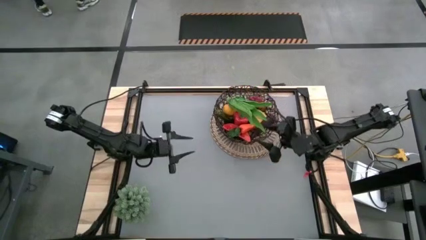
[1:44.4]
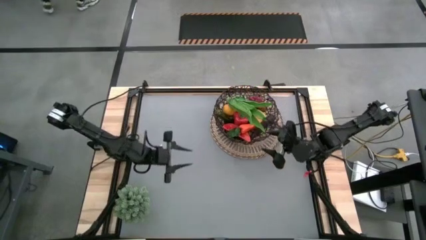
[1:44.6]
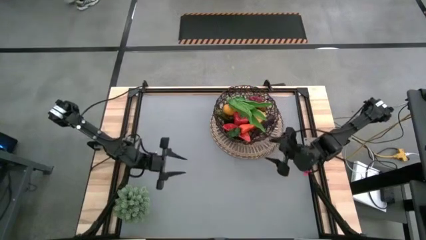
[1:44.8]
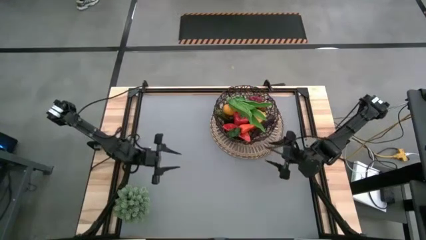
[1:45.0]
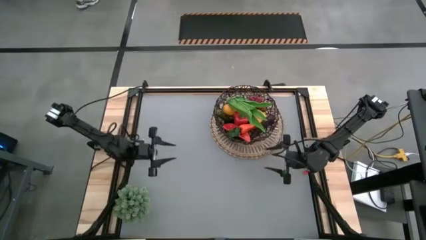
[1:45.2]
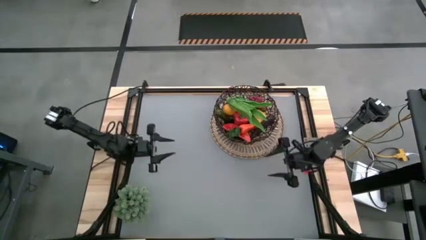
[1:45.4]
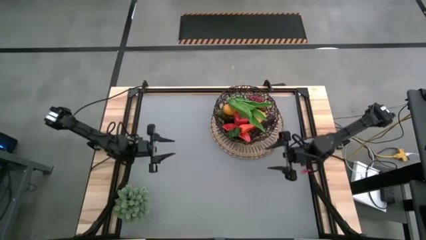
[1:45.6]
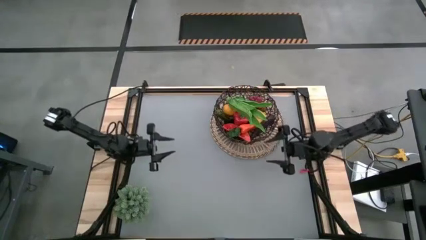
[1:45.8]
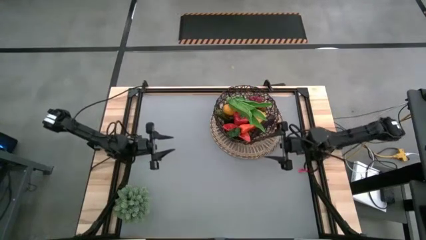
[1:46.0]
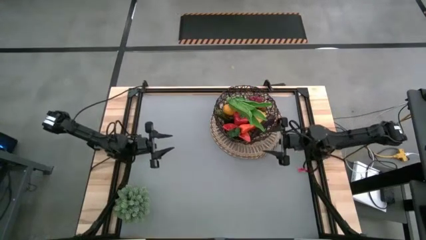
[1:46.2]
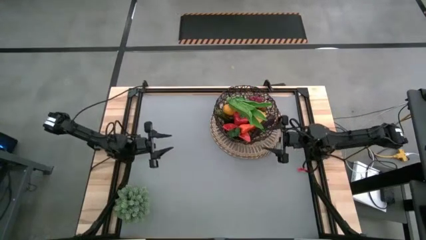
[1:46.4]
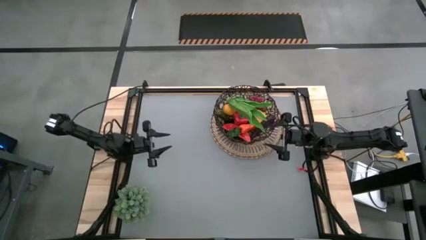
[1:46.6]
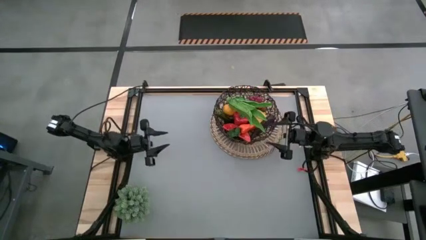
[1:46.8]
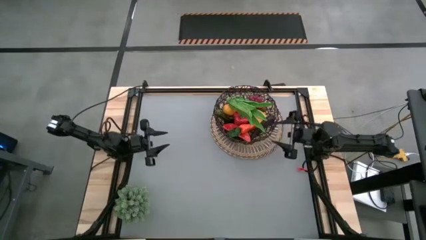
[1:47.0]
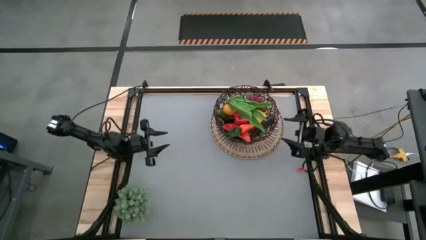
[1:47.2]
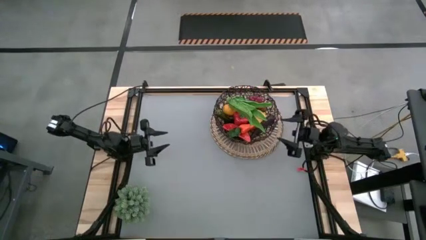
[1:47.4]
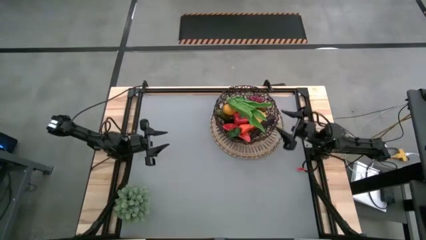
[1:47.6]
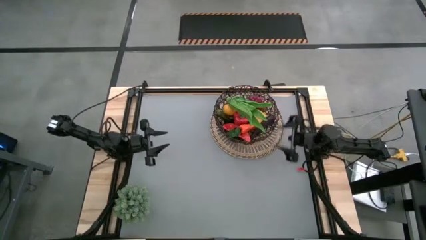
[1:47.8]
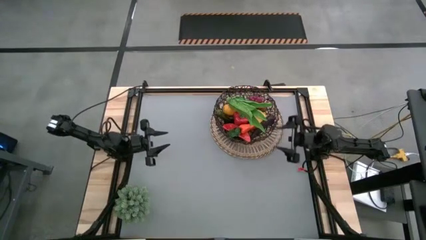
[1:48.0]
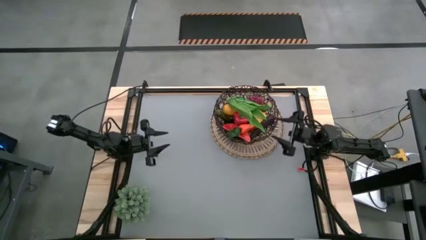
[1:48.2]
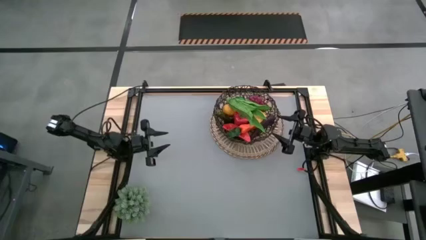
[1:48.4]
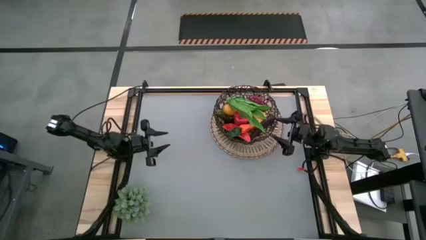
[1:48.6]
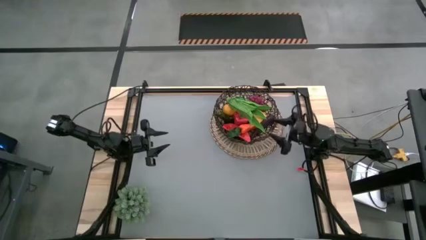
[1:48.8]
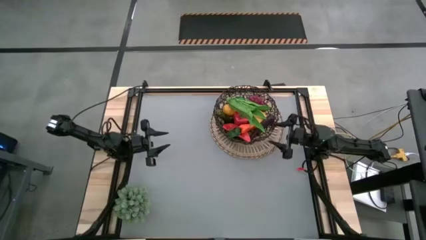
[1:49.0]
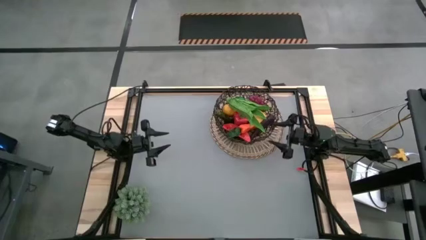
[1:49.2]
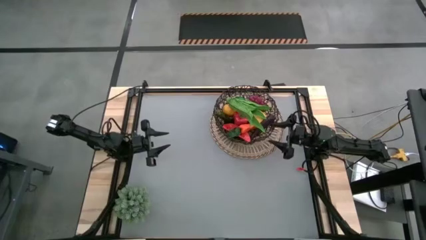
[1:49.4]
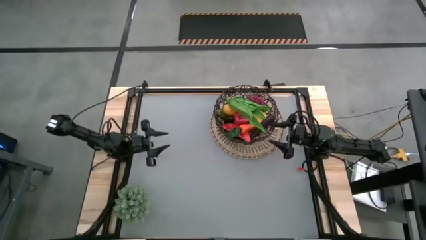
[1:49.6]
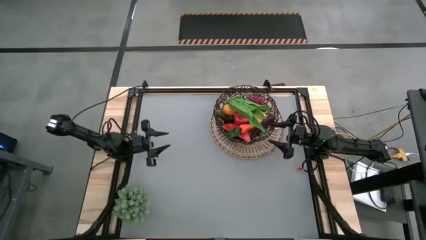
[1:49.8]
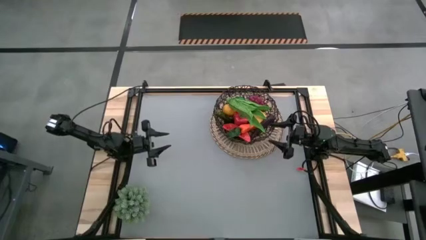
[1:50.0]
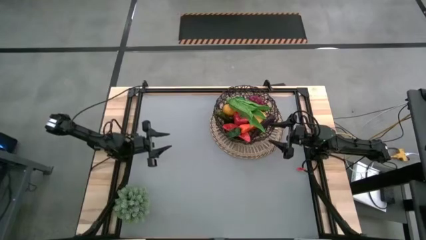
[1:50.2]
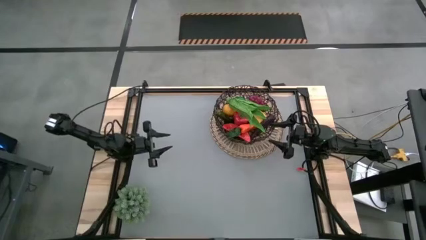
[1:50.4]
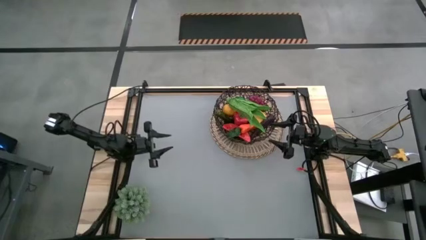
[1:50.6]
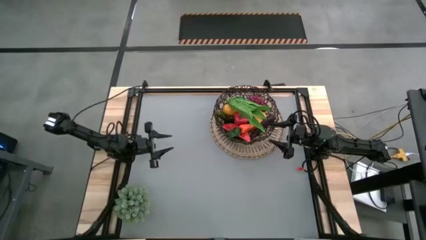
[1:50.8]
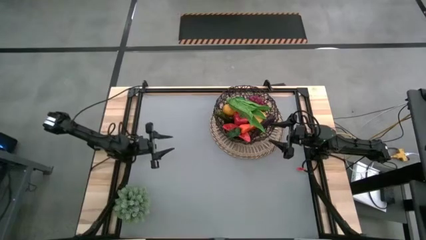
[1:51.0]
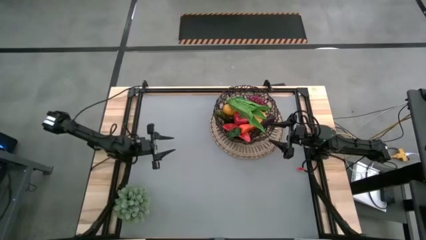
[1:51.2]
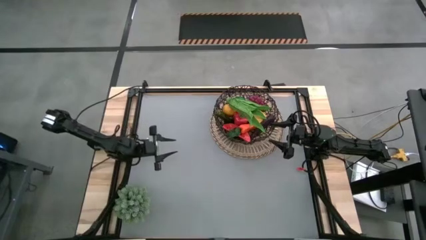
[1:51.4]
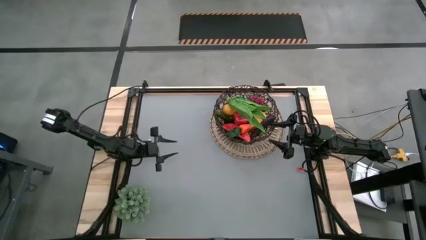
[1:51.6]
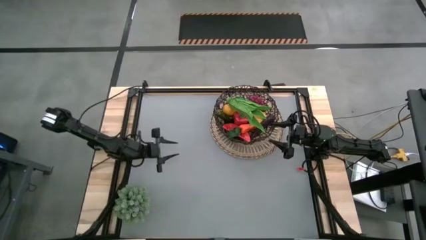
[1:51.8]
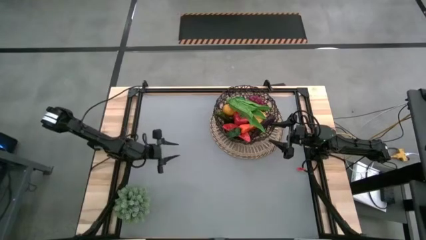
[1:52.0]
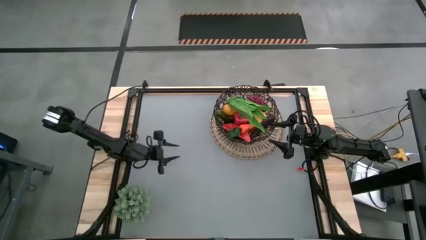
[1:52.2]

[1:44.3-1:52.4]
Task: Build produce basket
Return to Home Position
